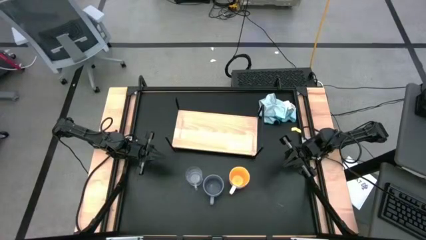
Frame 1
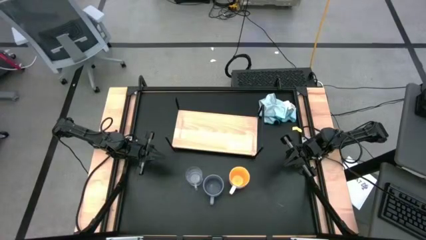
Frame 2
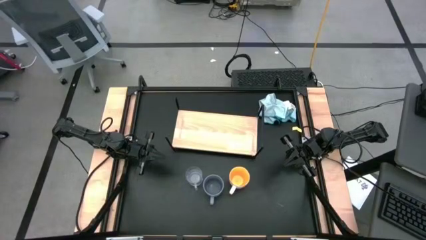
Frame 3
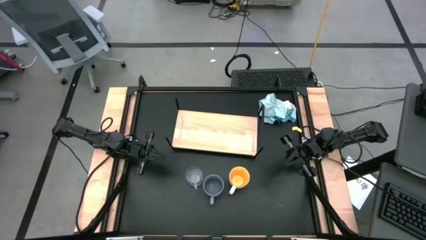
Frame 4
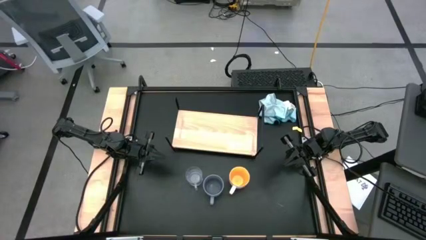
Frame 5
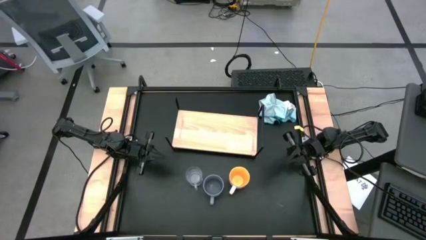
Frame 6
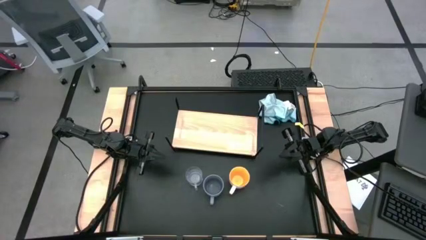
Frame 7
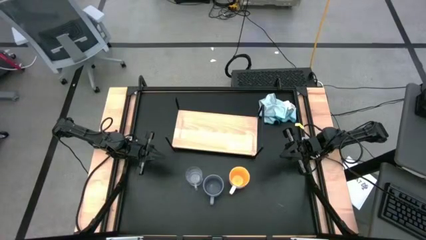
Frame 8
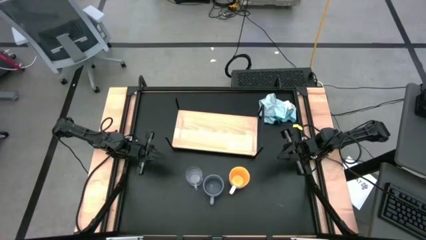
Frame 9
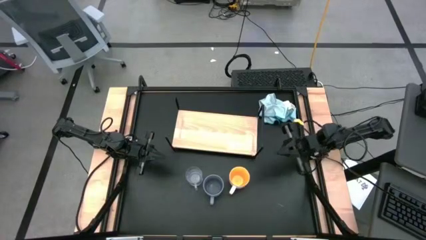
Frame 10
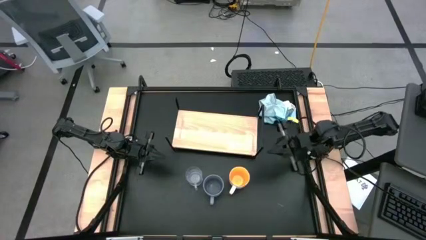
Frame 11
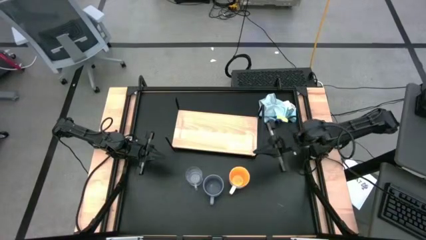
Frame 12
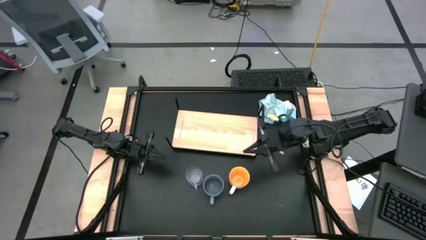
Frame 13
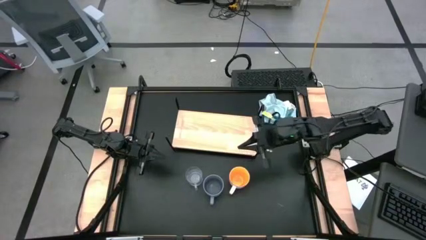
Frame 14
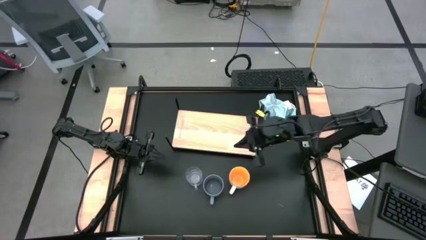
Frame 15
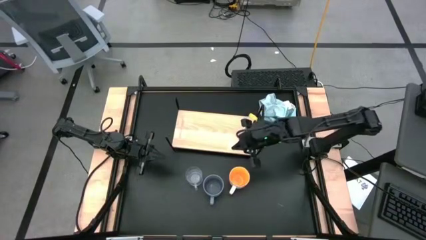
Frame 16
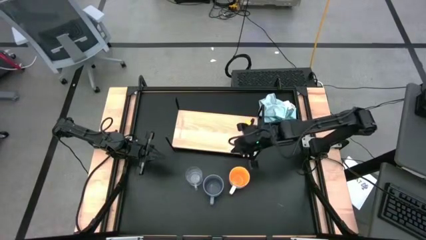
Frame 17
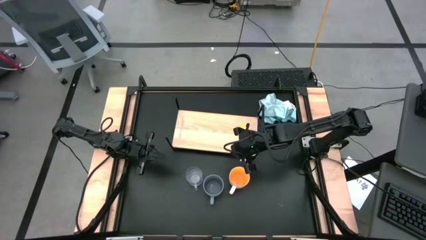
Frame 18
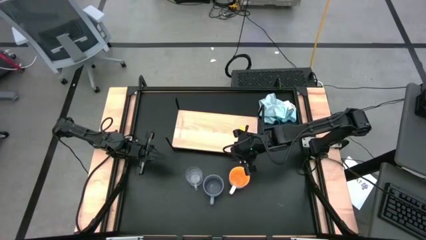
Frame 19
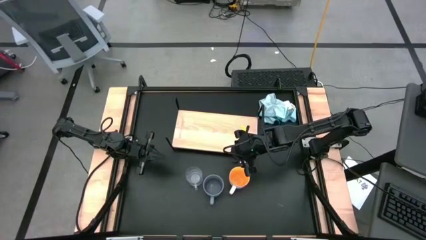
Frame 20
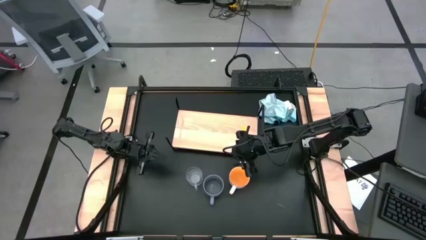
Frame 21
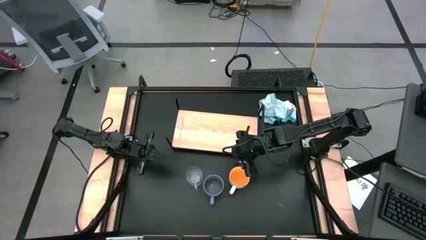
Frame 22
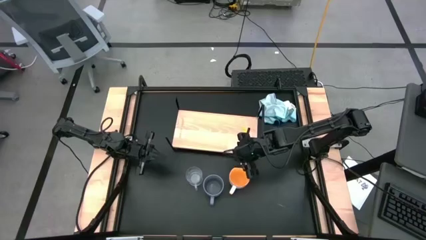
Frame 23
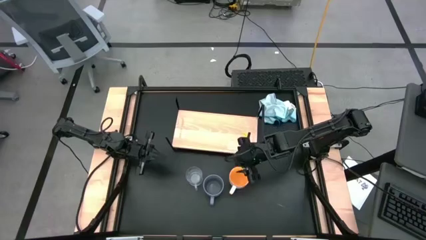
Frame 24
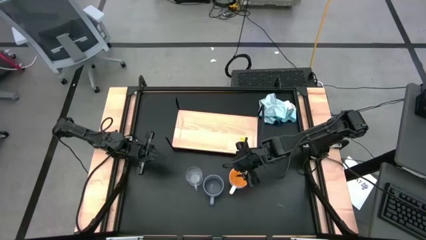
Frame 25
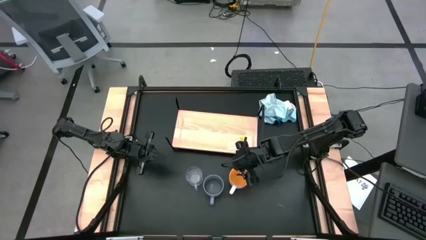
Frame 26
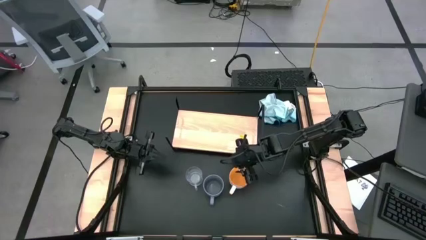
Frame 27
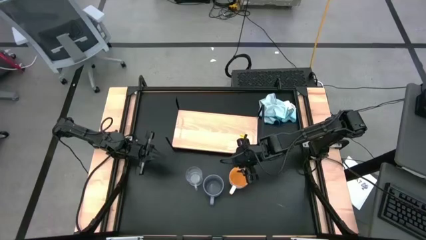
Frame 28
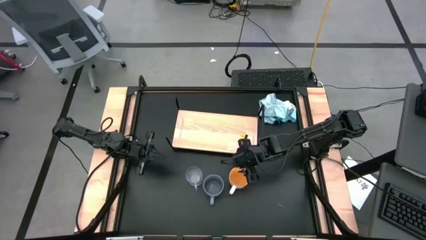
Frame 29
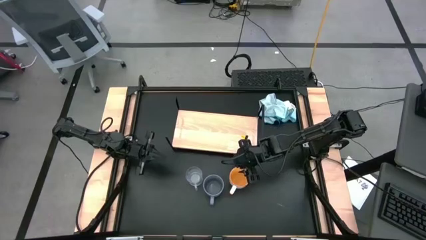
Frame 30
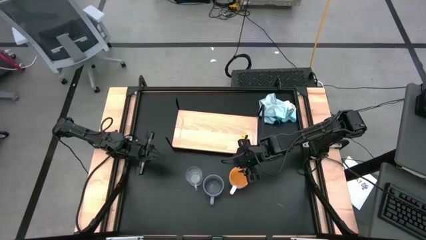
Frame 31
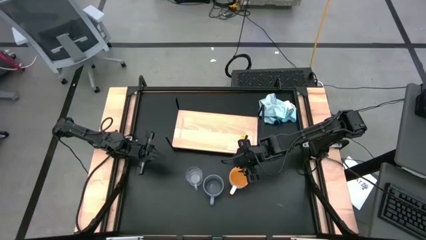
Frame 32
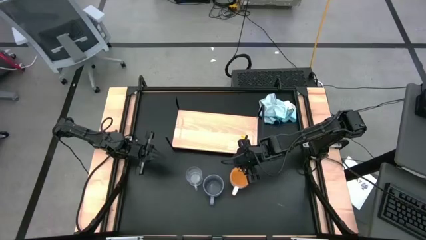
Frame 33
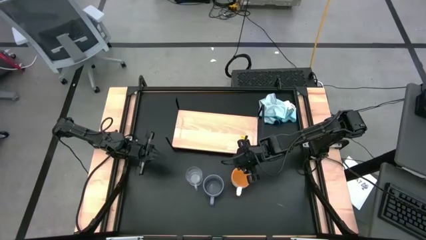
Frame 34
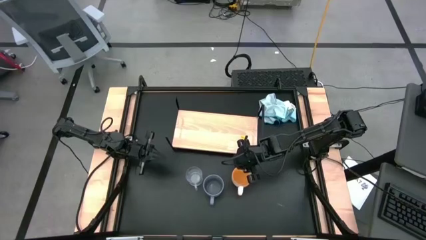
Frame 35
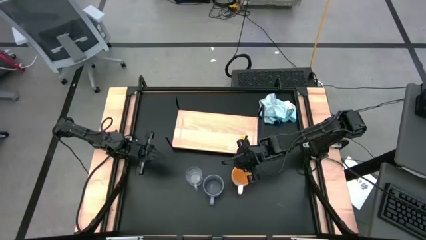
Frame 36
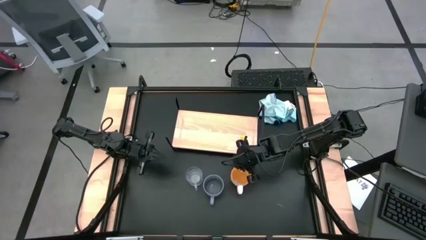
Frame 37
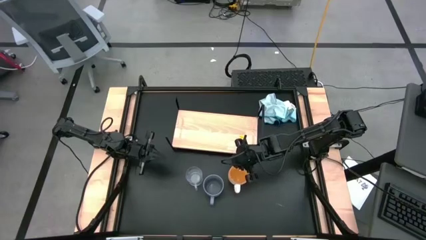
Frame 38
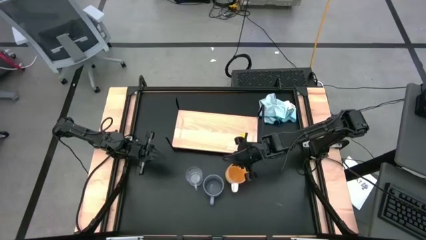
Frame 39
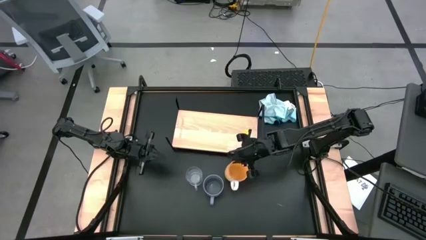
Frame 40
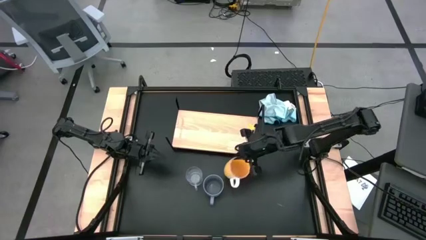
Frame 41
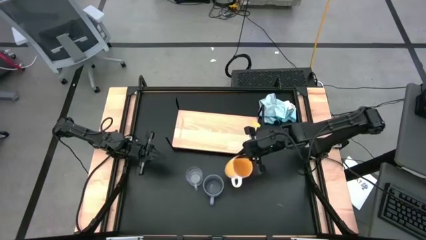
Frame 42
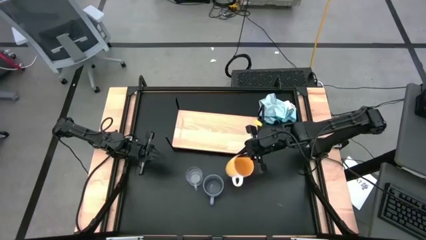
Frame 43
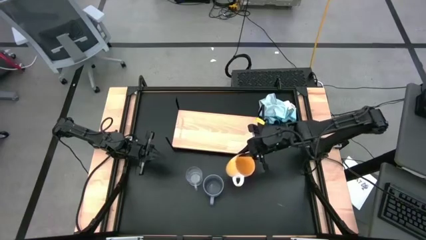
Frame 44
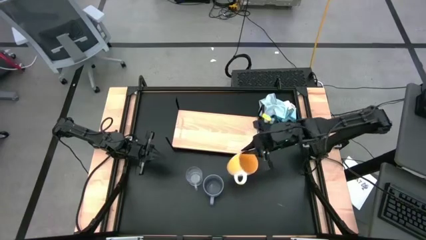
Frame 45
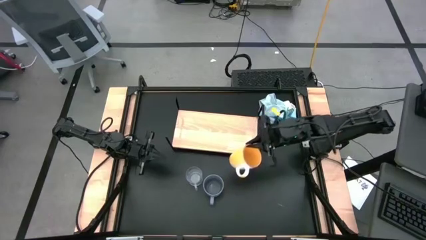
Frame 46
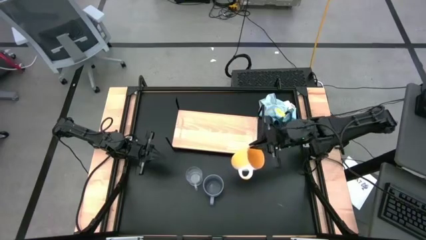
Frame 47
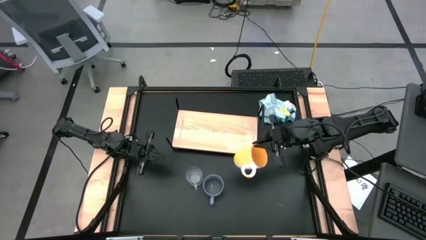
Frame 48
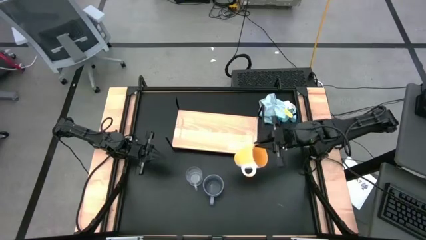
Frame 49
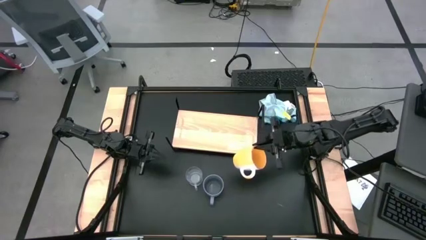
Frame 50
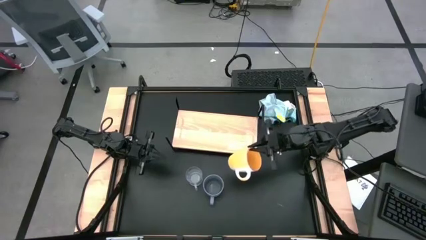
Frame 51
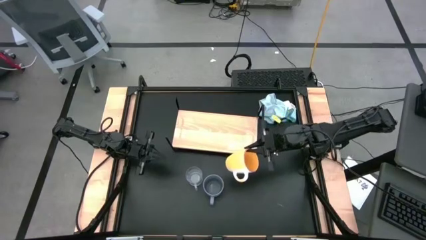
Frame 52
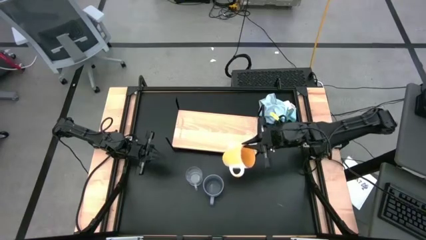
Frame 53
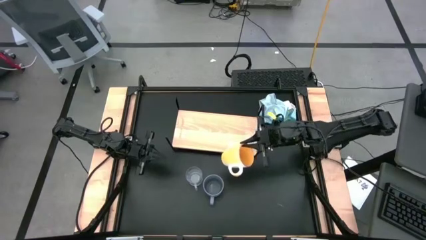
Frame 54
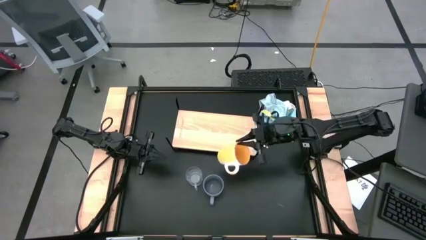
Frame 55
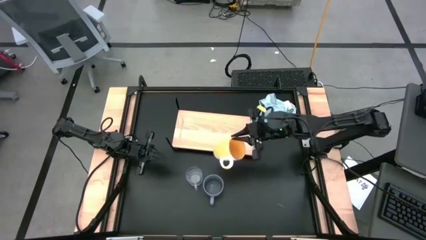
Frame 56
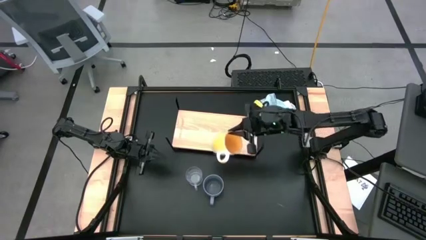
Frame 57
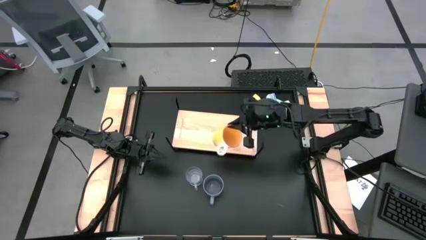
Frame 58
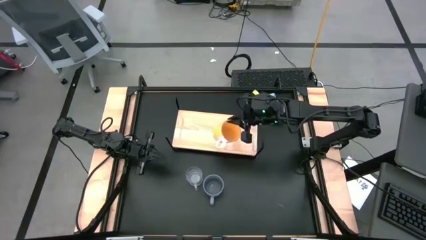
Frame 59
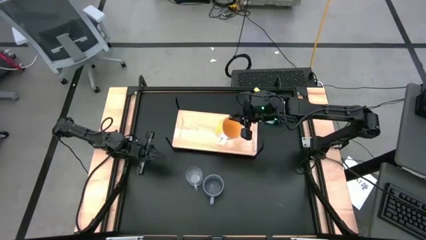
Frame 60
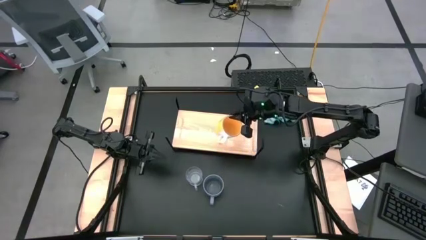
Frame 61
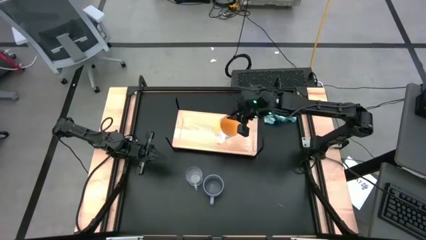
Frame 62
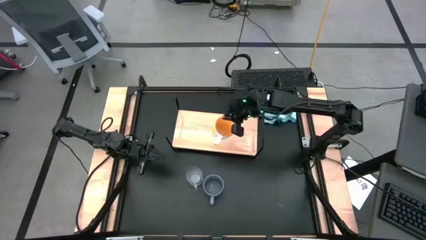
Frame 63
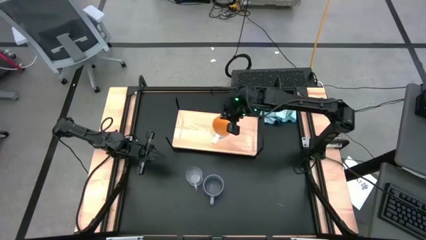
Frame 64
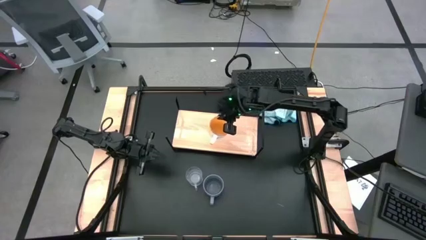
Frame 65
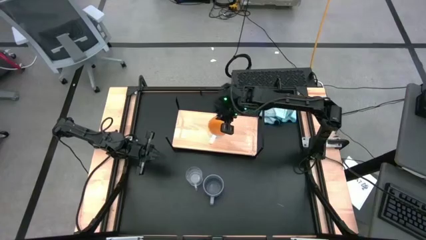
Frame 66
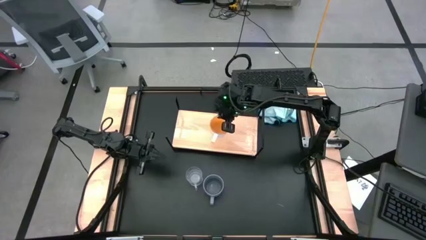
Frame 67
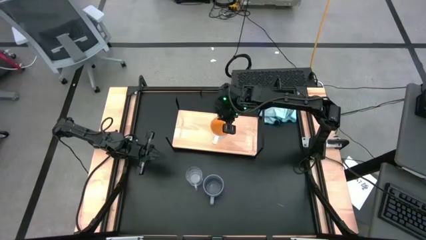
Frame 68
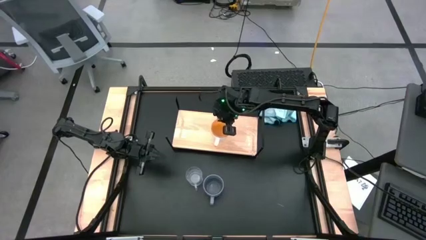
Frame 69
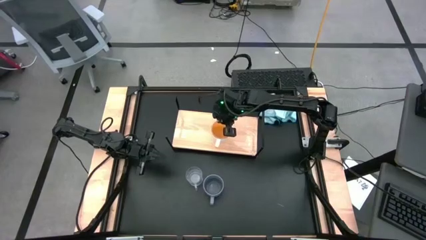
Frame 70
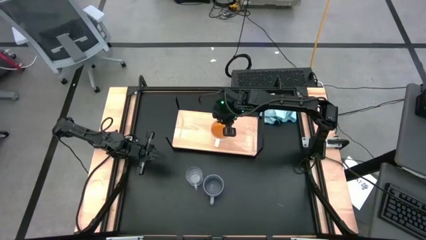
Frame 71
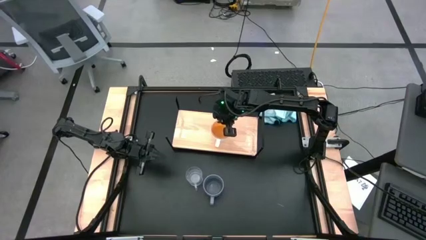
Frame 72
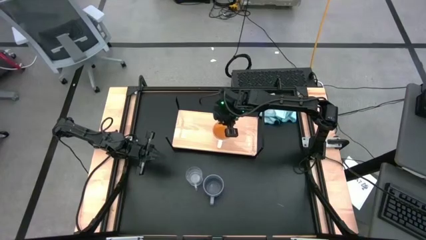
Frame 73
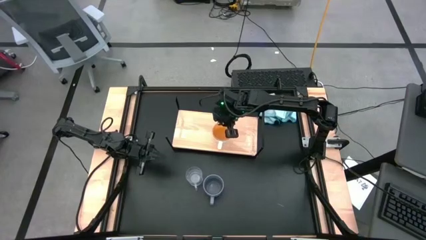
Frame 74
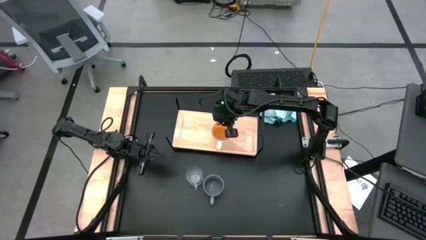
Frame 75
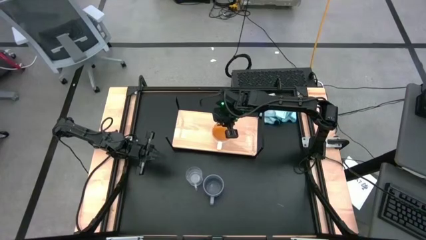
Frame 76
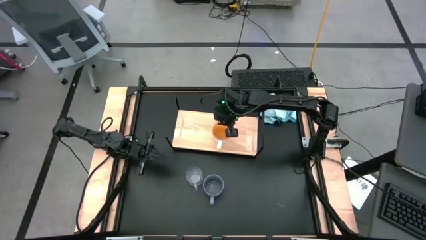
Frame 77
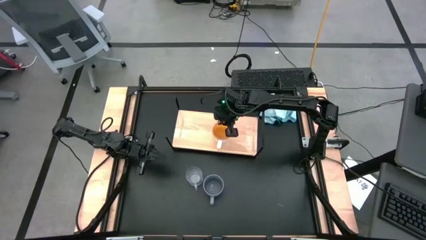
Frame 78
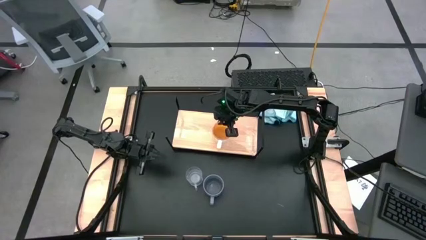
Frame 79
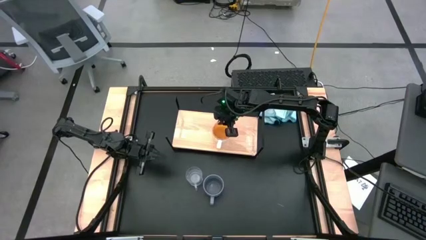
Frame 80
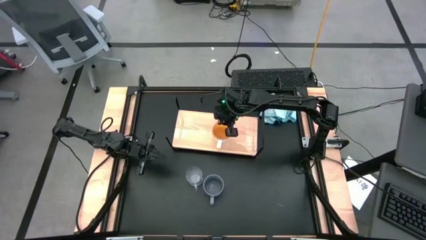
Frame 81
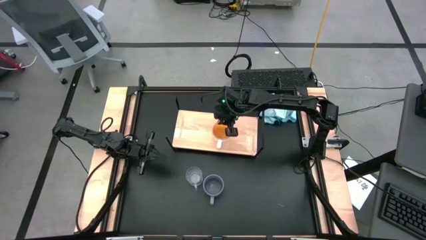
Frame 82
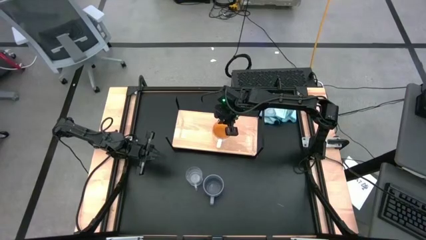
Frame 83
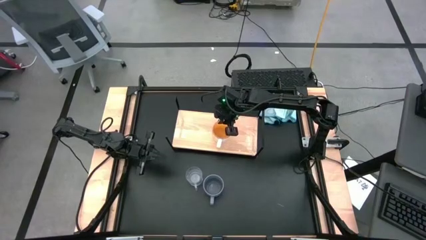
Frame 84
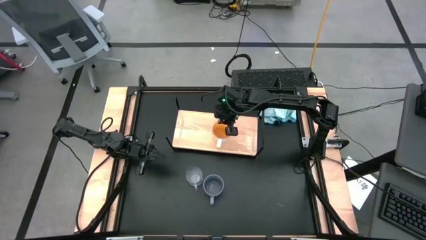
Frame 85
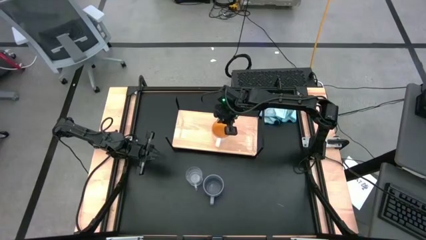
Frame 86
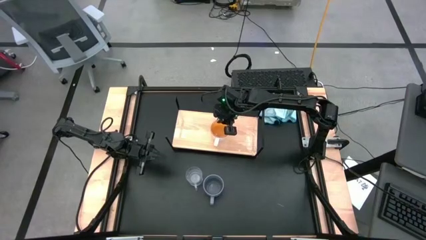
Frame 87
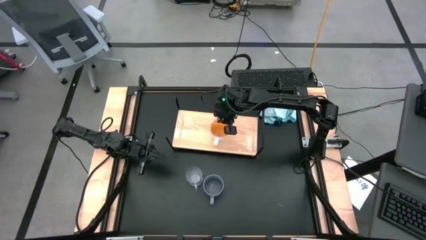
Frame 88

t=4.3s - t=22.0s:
Task: Stack small to large cups/mugs on shelf
Put the yellow mug on the shelf
